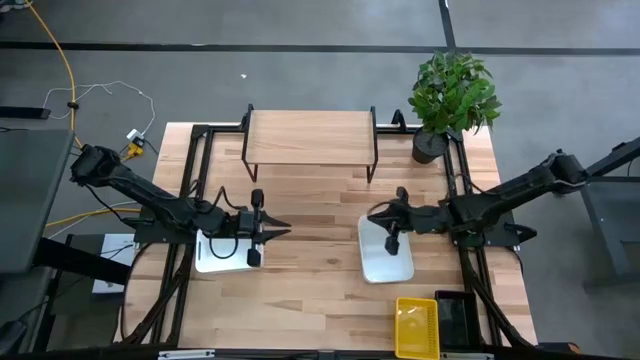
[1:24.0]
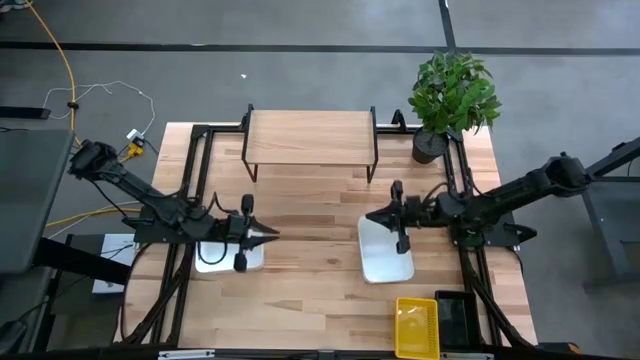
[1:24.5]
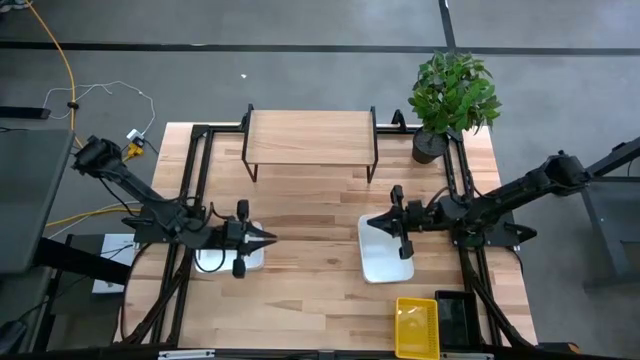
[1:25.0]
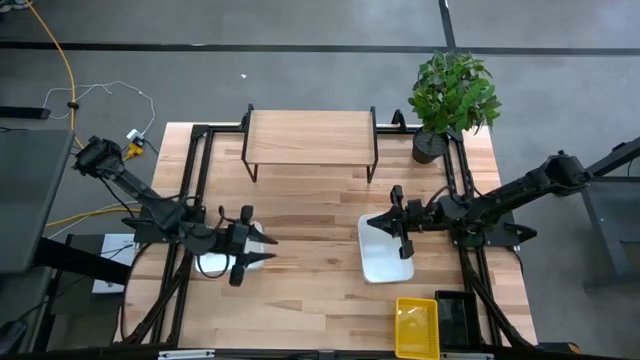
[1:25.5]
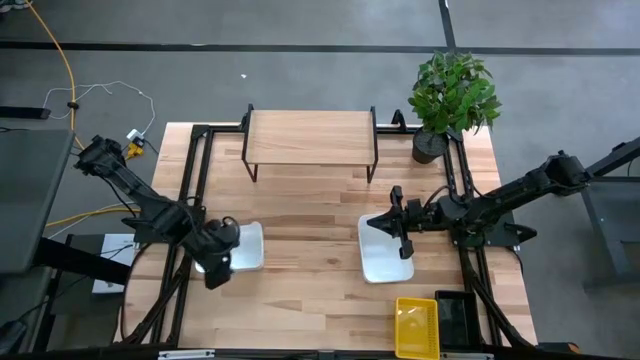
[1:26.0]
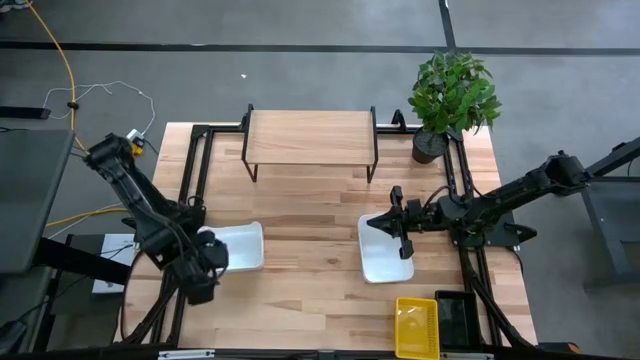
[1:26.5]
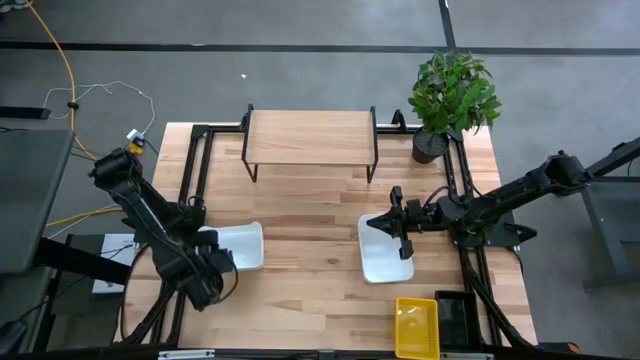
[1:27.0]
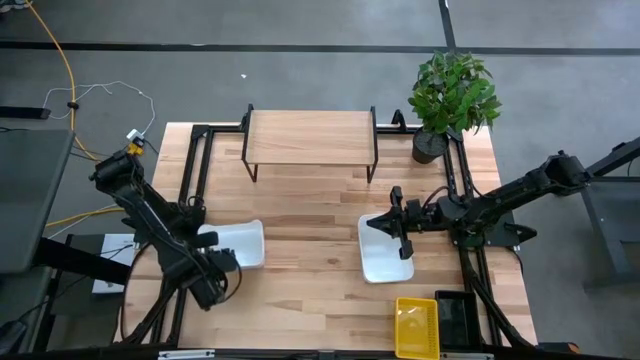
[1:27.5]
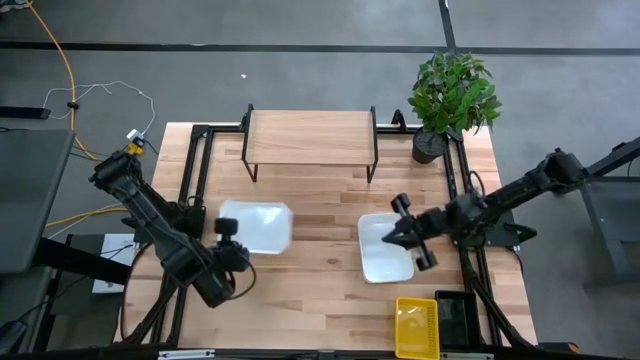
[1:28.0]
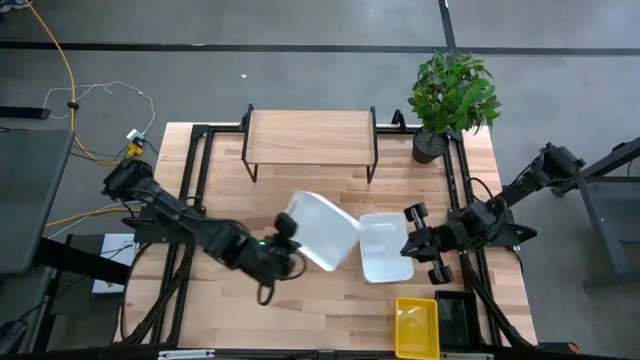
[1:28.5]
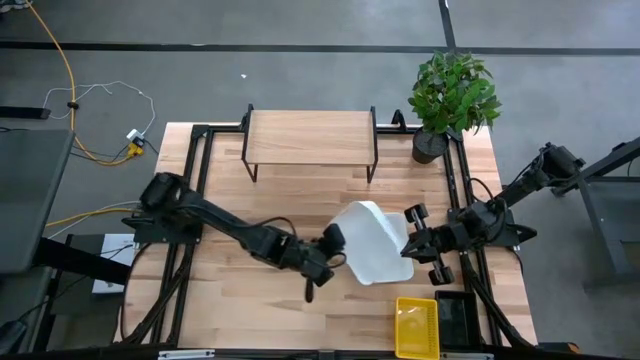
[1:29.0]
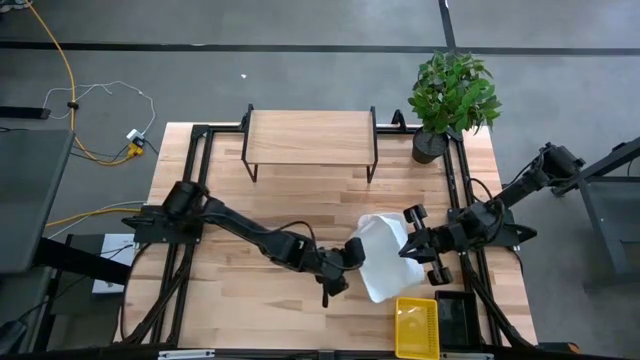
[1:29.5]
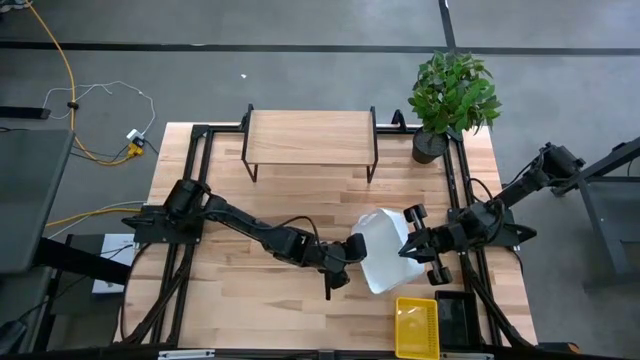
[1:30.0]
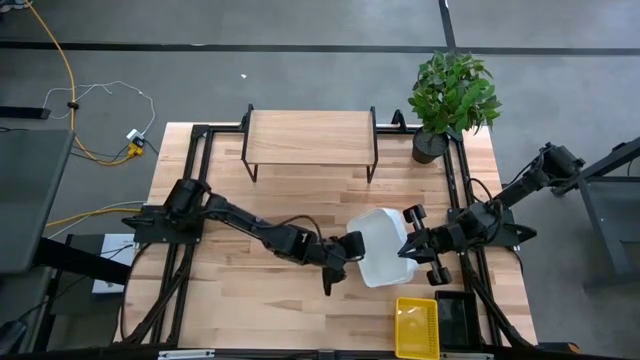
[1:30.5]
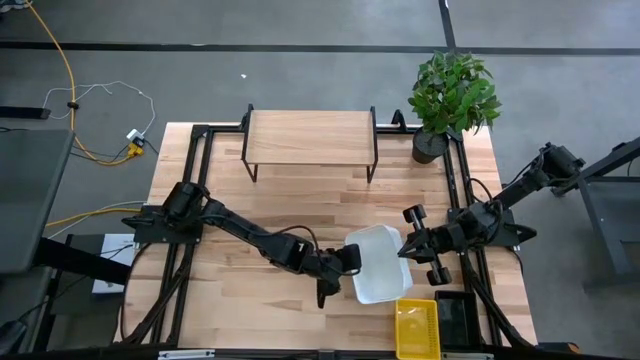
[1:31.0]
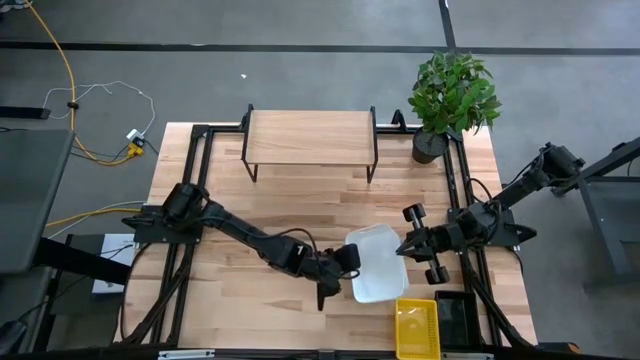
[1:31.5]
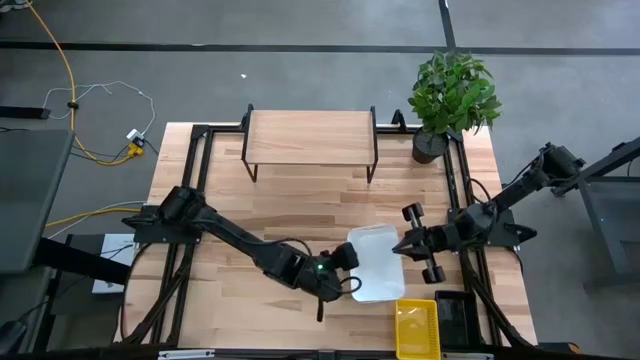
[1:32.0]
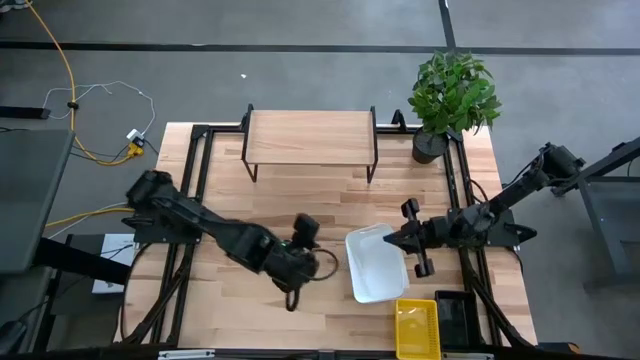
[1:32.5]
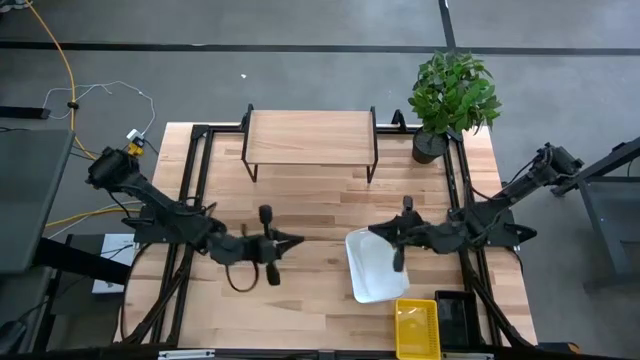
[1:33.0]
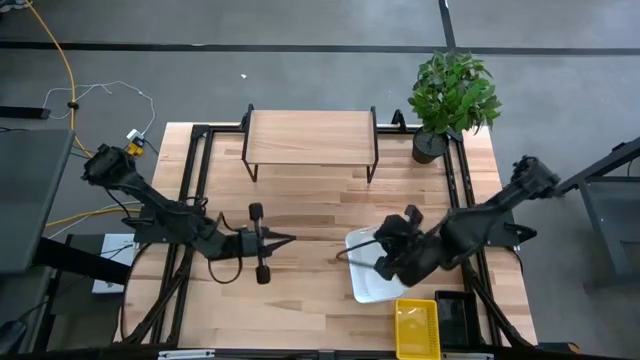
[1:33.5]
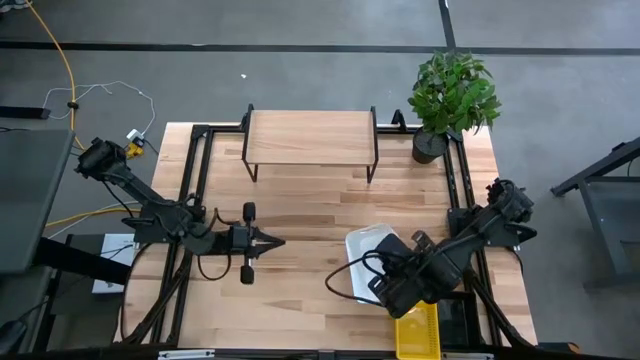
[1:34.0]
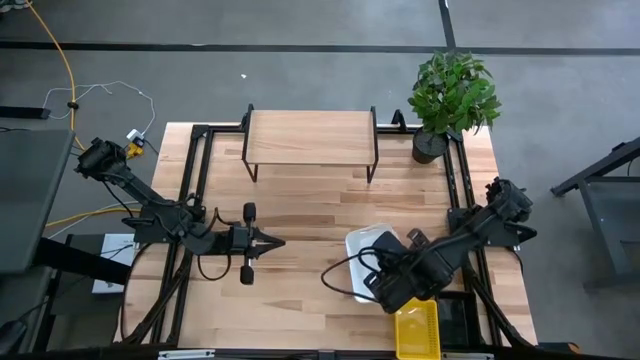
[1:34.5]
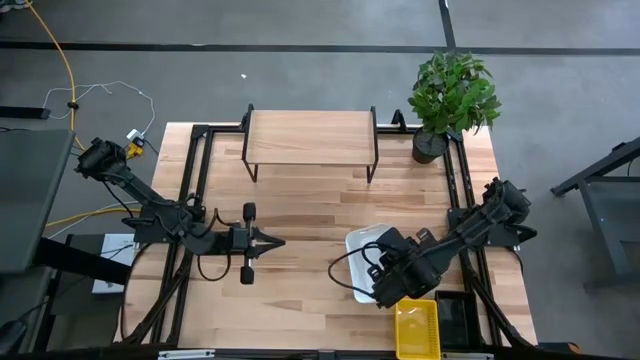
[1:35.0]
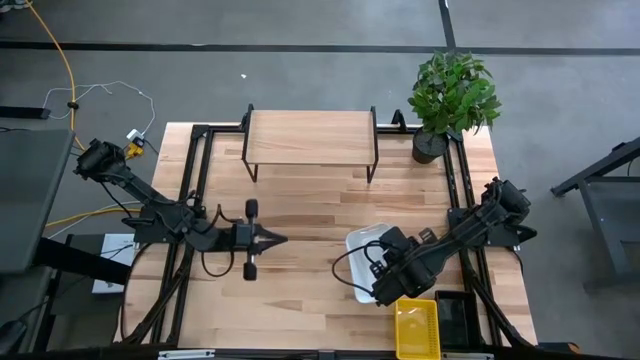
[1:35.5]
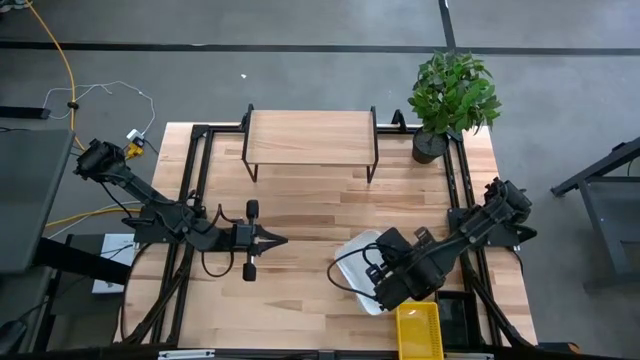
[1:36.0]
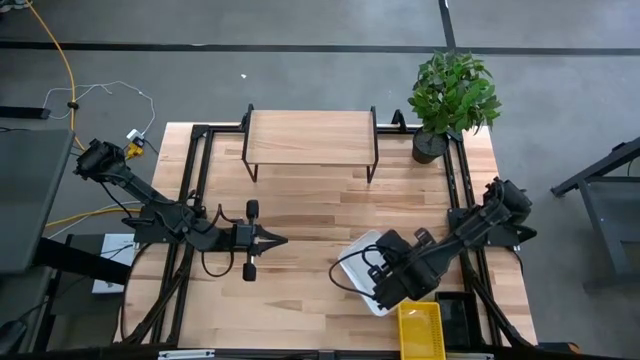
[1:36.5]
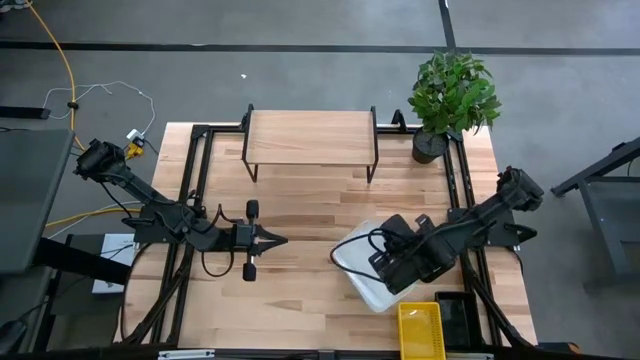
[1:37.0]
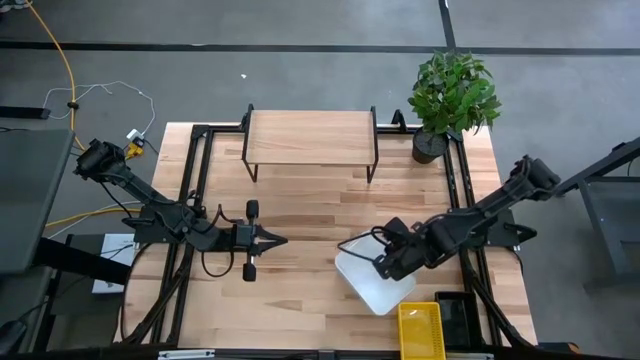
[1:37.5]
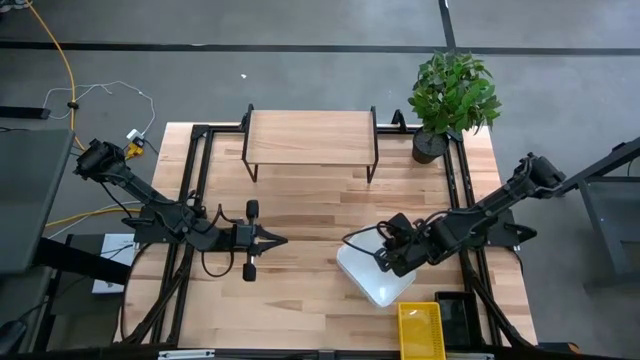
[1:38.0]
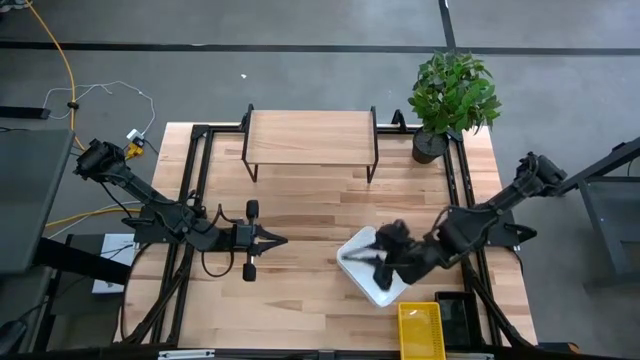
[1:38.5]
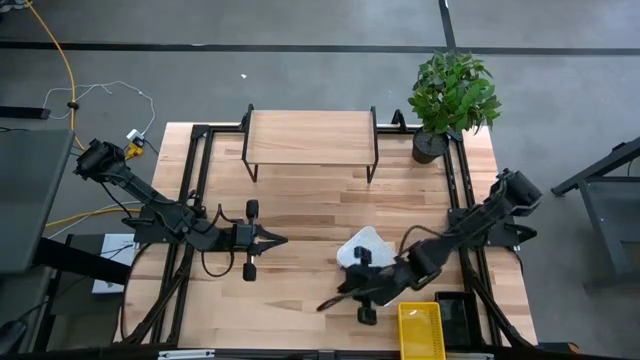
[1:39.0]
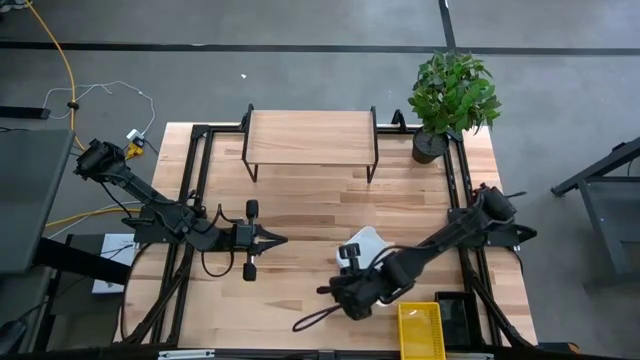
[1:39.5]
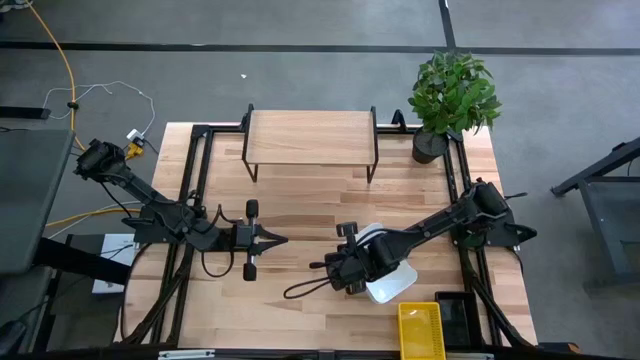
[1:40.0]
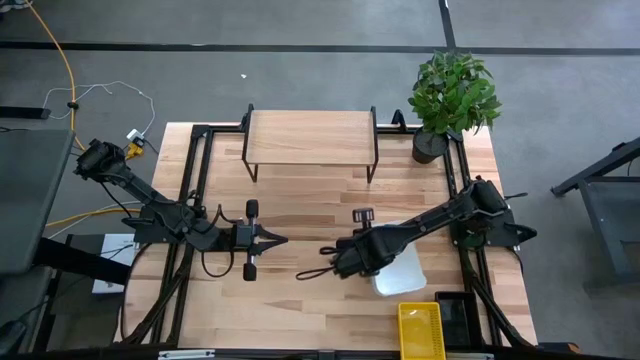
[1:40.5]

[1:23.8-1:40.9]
Task: Stack baskets on shelf by color
Stack the left white bin on the stacked white bins

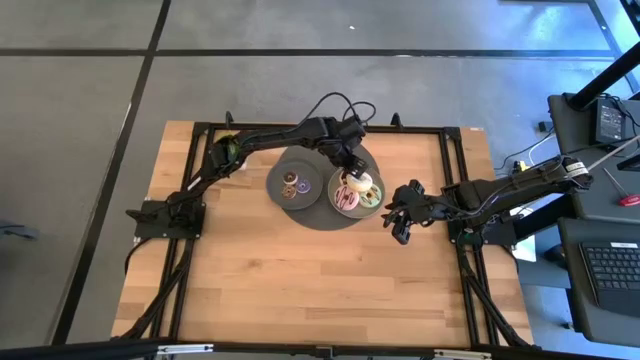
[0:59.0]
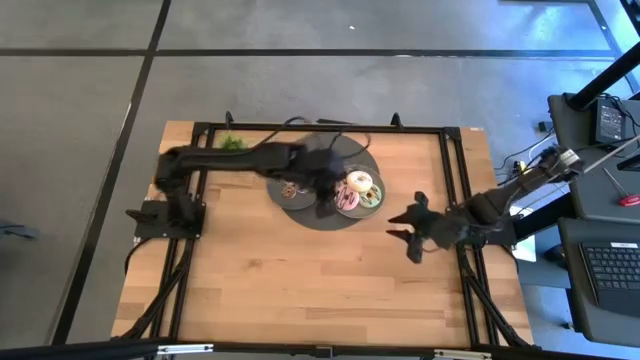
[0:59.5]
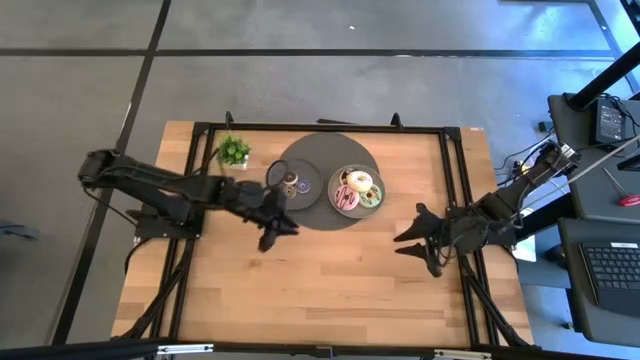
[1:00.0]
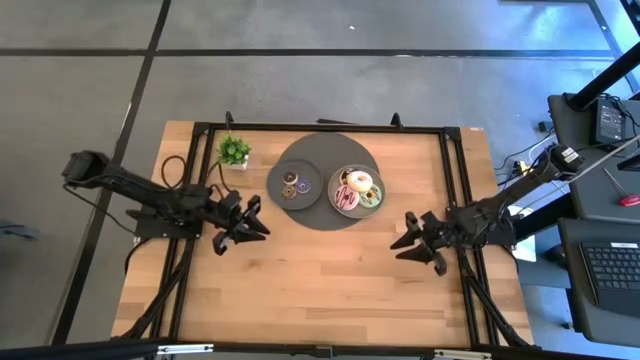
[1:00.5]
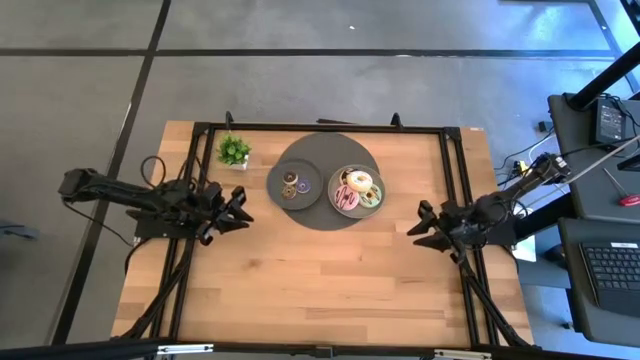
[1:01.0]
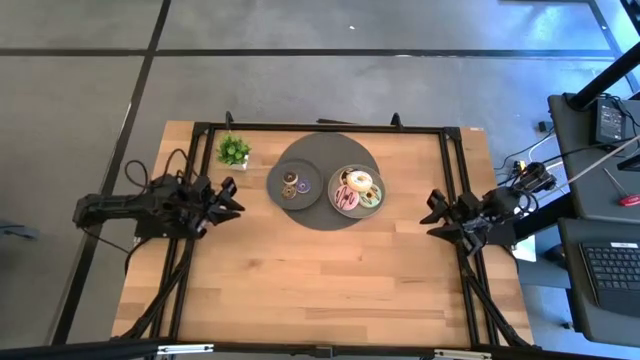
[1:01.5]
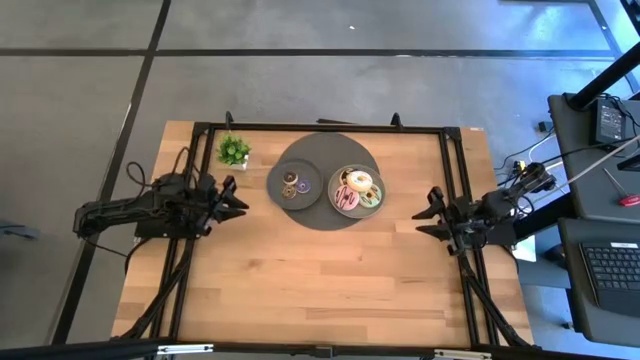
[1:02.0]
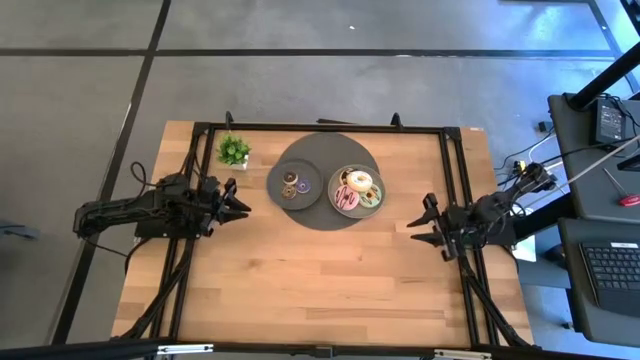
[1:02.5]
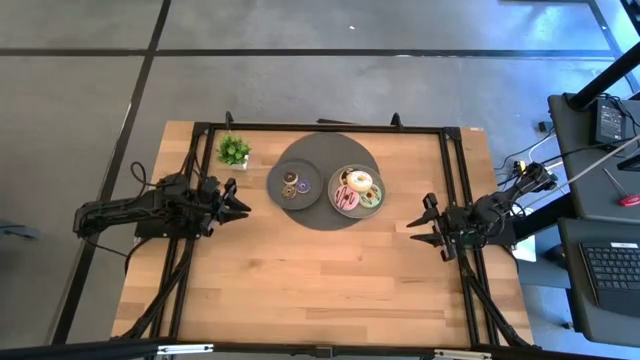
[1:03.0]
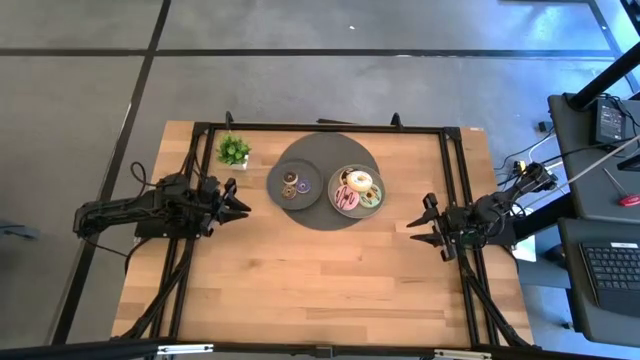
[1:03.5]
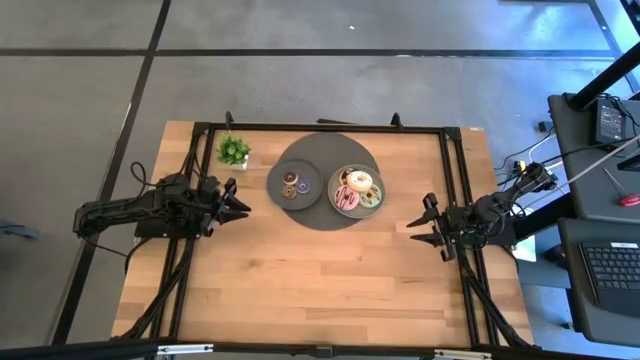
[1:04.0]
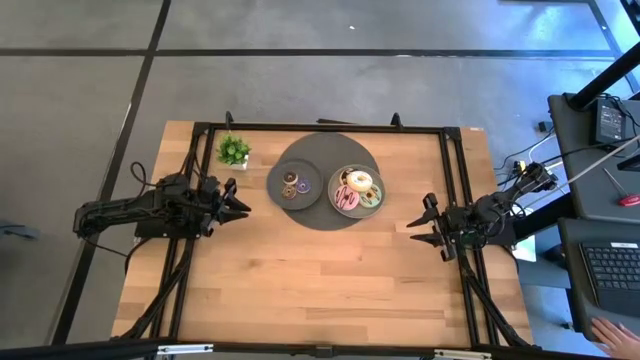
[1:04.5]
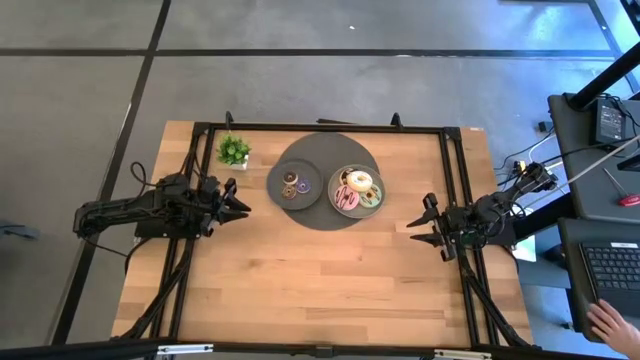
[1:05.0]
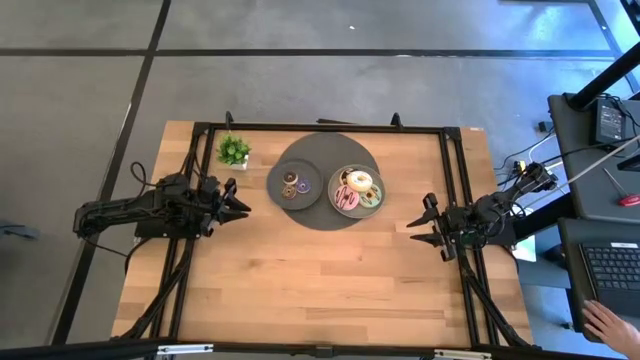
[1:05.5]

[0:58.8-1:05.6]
Task: Pick & Place donuts
Return to Home Position
